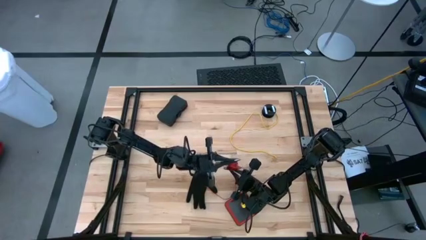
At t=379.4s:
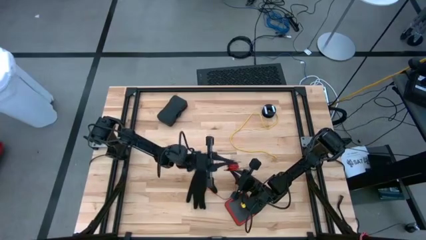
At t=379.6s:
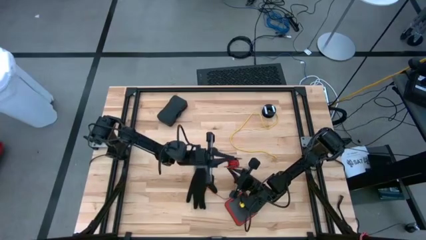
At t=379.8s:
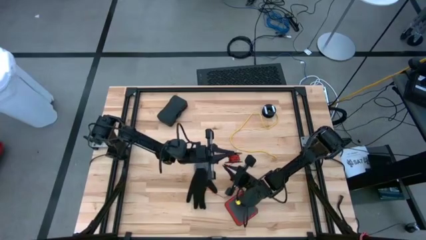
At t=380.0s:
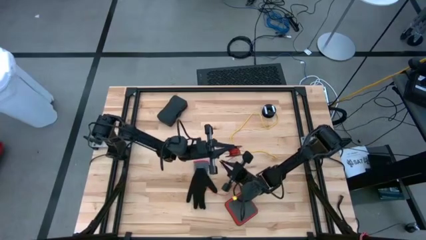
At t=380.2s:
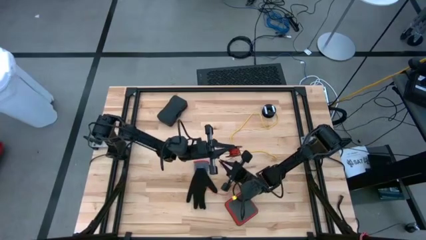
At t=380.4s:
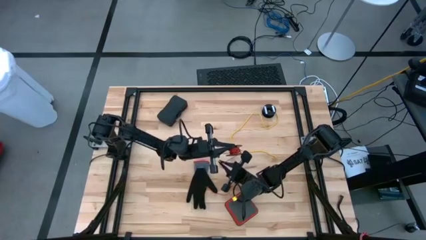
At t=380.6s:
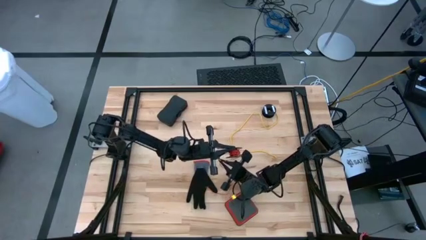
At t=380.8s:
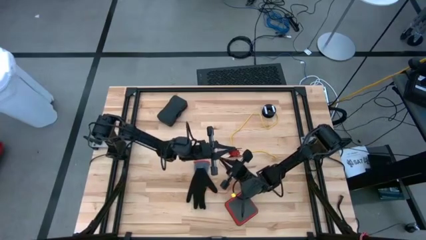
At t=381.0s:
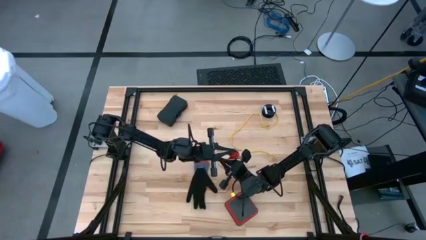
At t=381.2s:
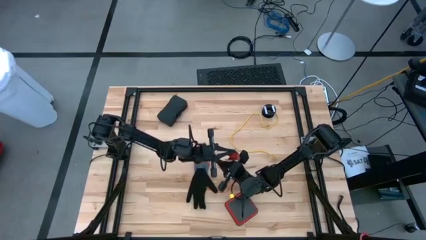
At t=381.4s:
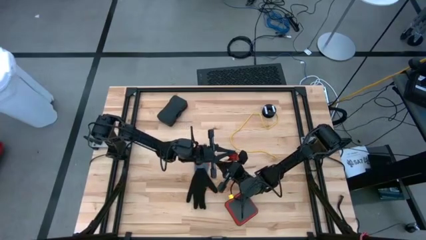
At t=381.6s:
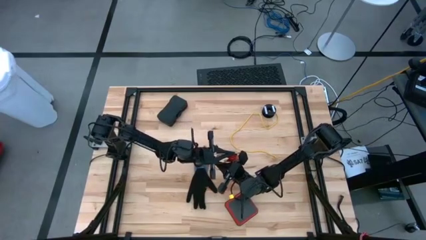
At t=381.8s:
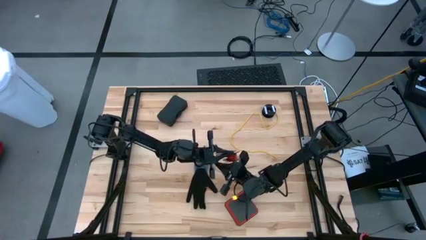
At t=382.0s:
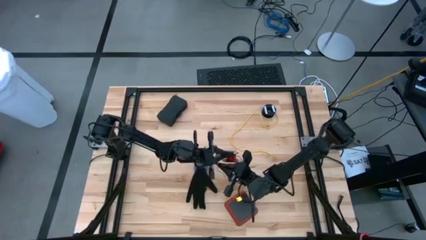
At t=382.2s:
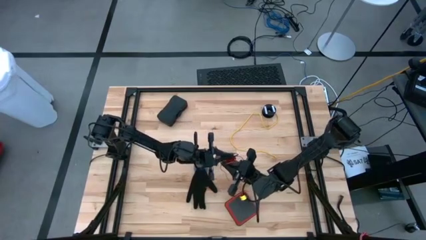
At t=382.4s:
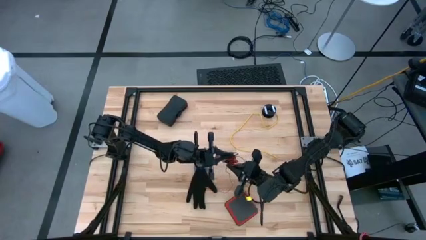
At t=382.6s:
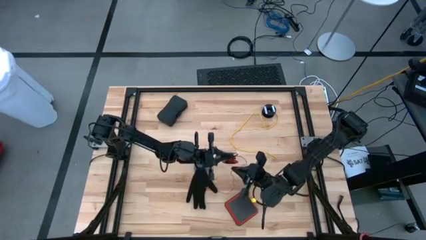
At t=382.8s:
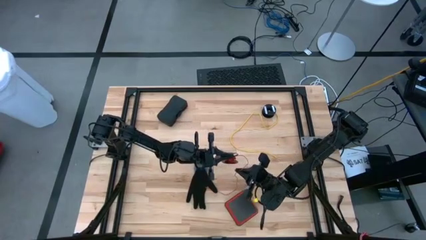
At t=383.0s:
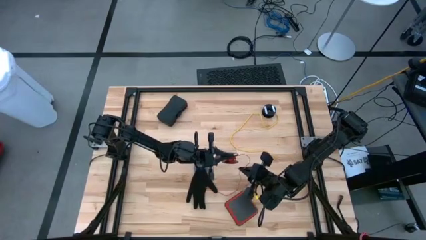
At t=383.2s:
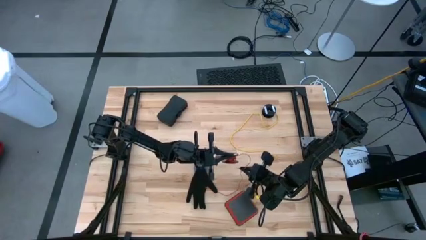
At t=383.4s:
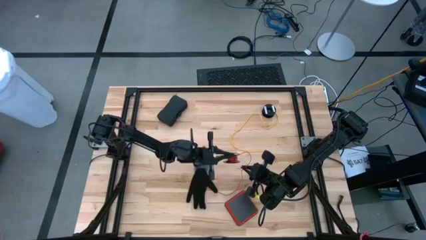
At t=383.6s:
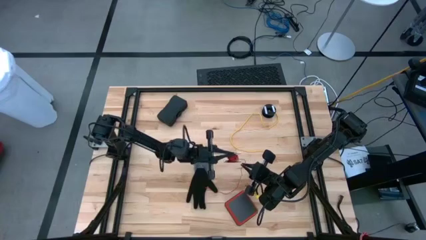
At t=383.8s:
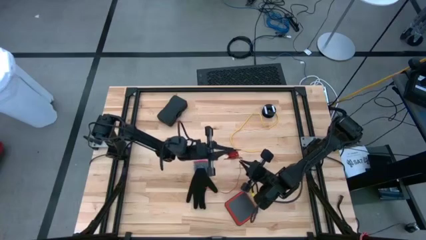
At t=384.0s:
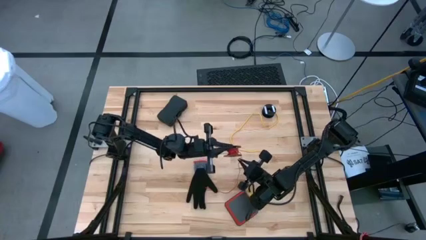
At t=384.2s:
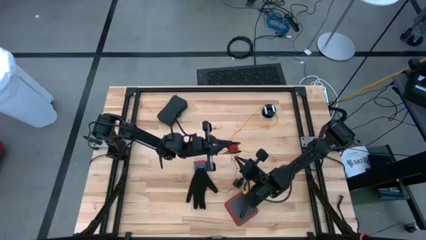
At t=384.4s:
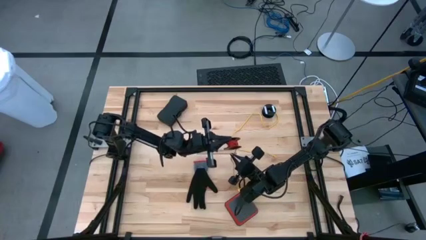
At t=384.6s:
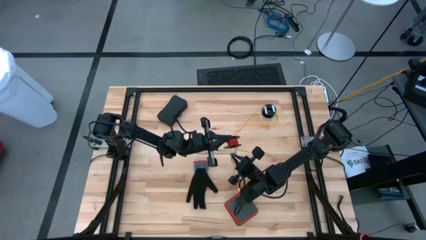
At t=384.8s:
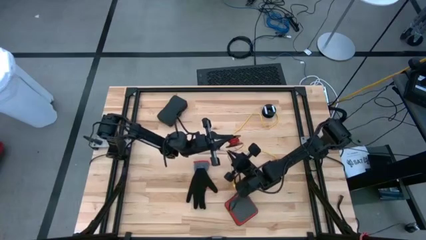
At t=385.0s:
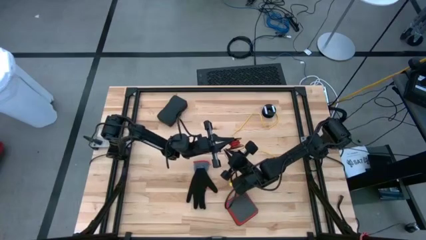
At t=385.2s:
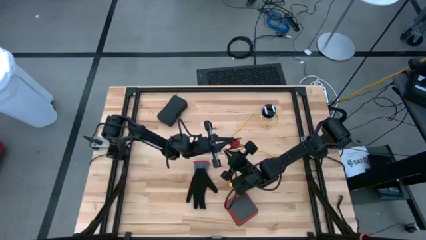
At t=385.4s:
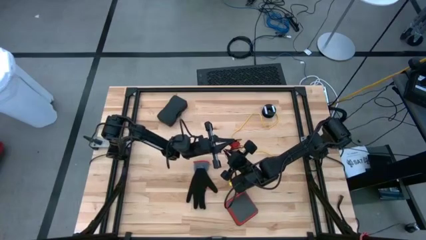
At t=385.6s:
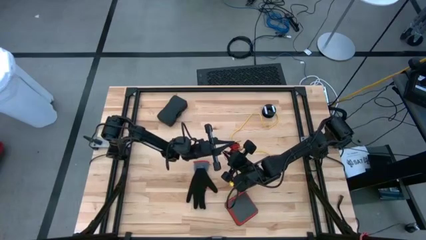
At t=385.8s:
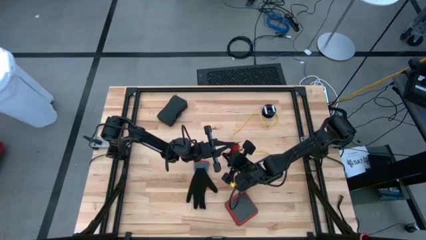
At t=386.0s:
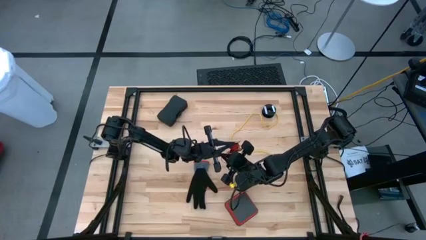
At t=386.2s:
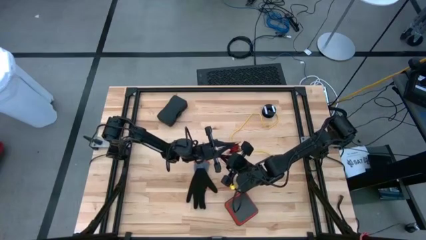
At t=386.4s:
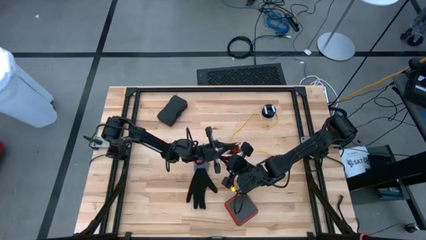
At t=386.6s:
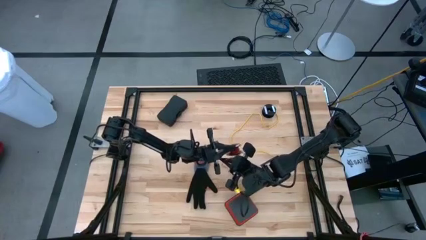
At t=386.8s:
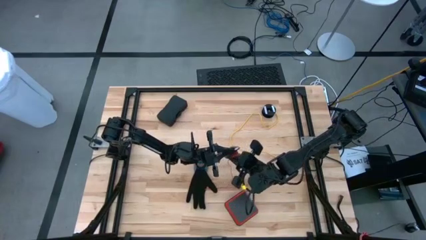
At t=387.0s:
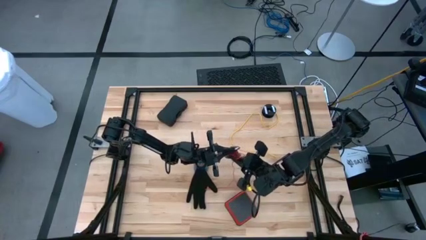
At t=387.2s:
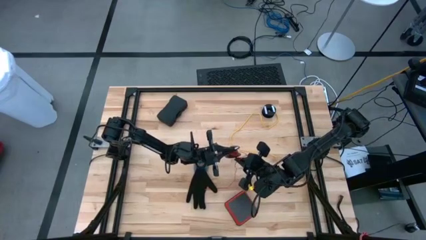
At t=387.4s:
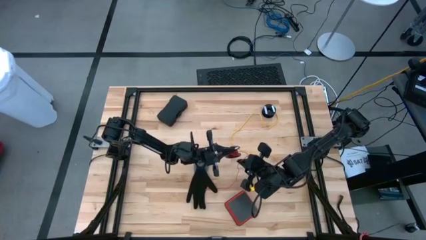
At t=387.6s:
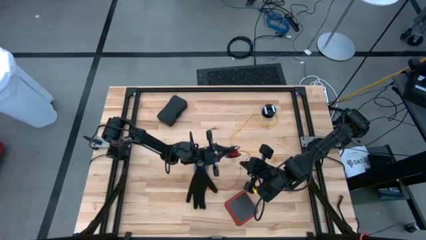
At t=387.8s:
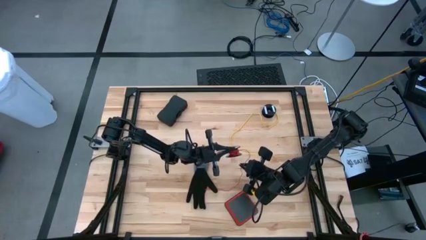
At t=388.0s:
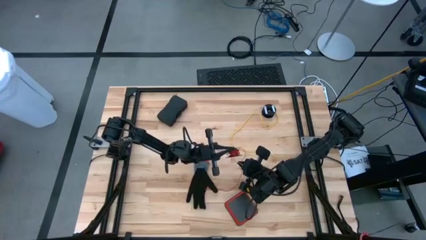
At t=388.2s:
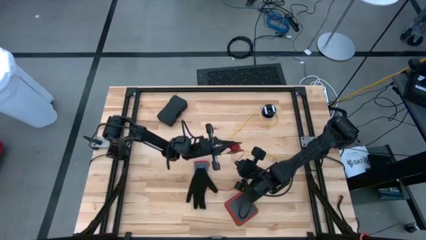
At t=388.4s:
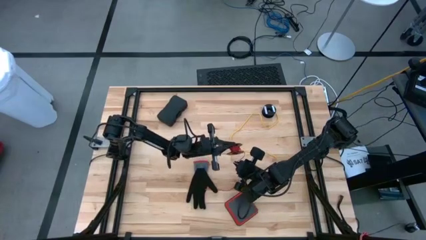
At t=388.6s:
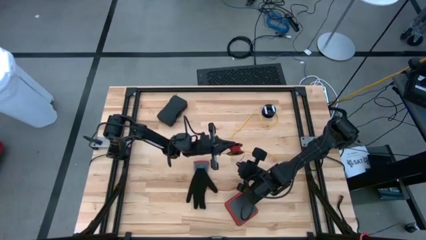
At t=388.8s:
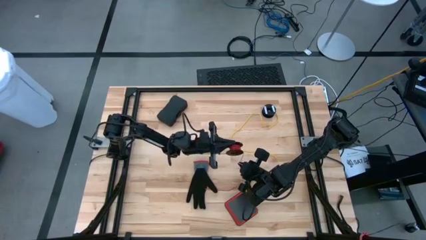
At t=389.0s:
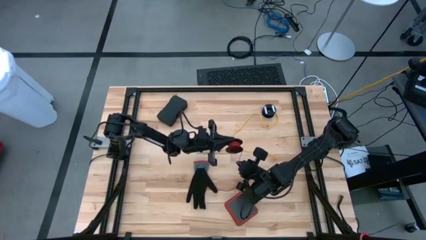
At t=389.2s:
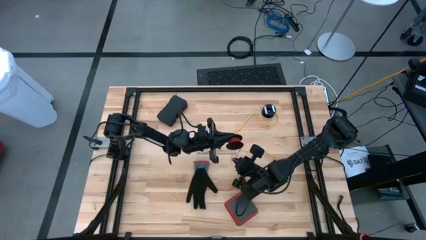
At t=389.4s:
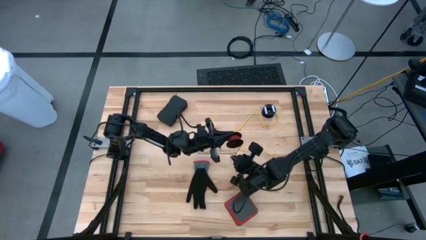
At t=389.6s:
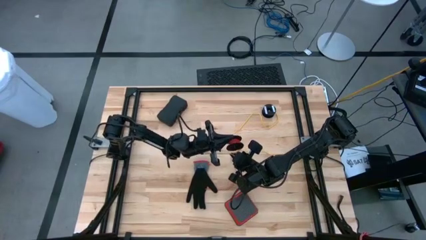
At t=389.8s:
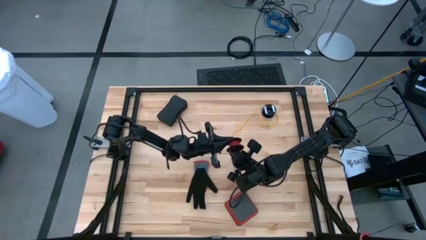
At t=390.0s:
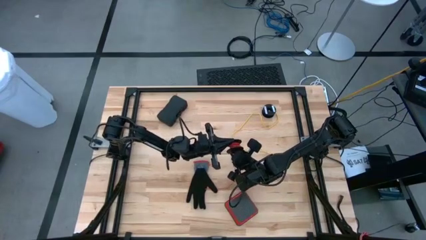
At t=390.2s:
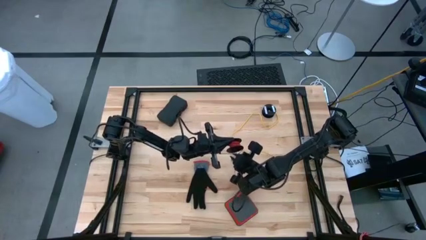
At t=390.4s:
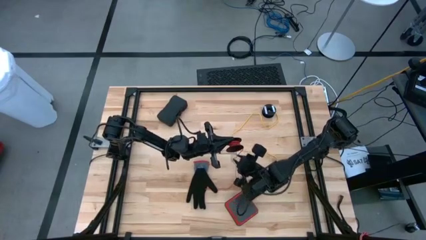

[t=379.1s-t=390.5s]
Task: Coil cords
Coil the red wire onto the black spool
